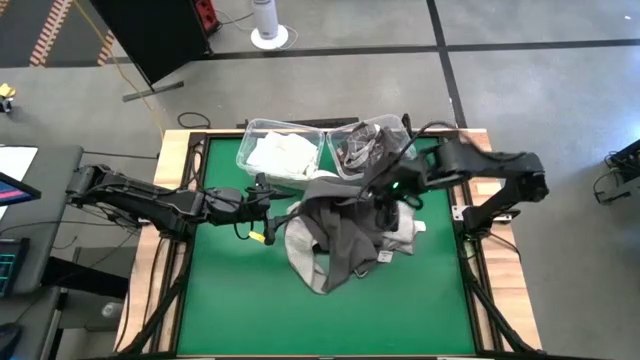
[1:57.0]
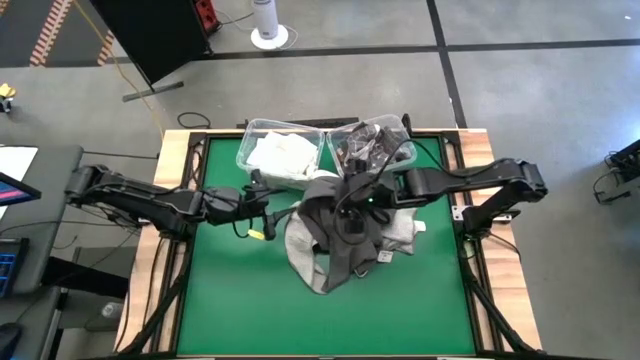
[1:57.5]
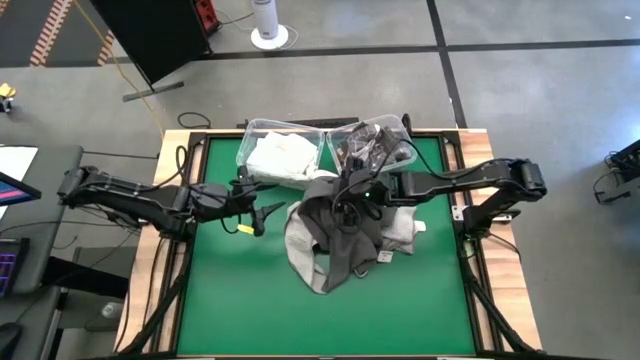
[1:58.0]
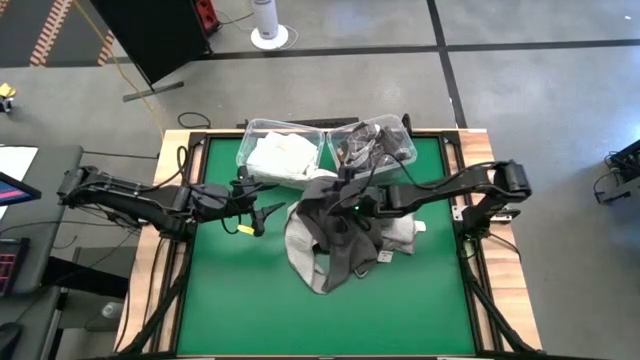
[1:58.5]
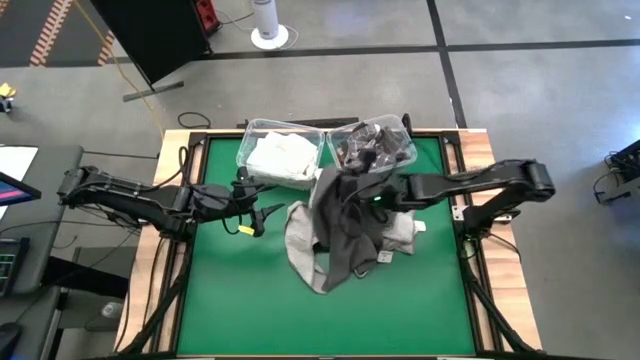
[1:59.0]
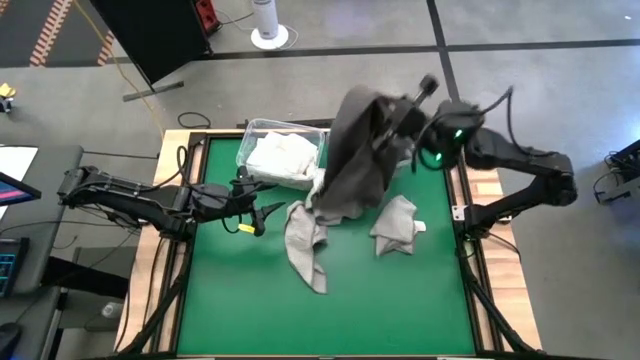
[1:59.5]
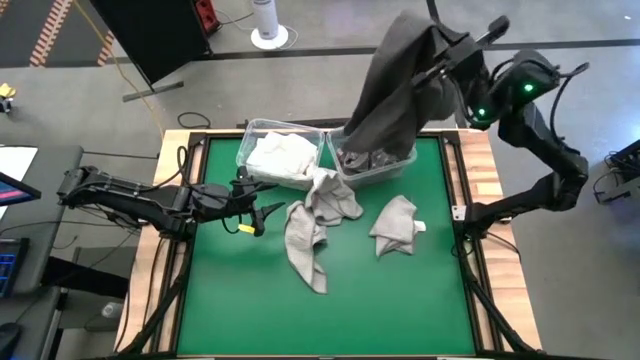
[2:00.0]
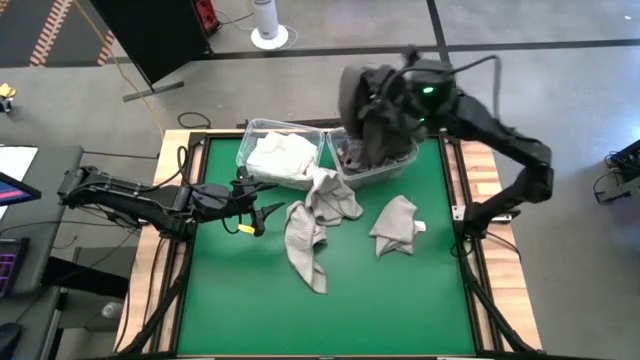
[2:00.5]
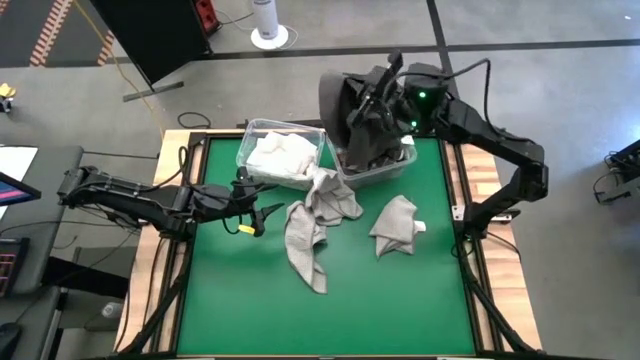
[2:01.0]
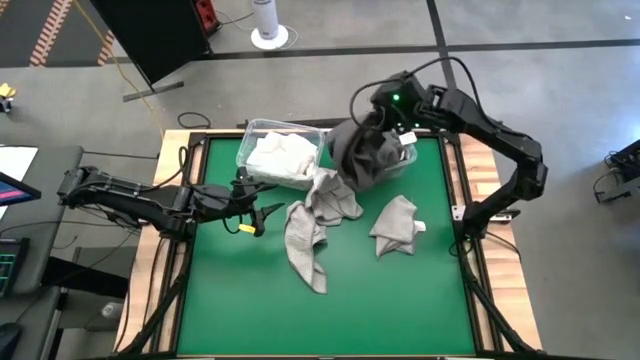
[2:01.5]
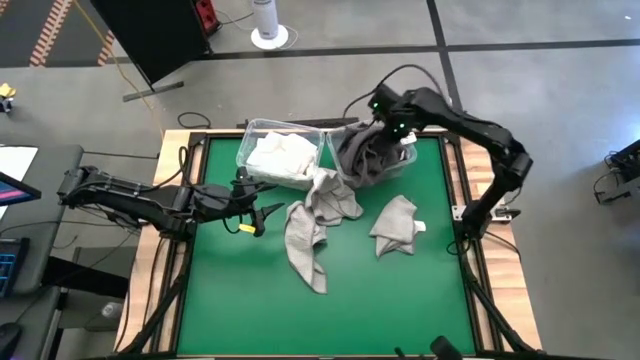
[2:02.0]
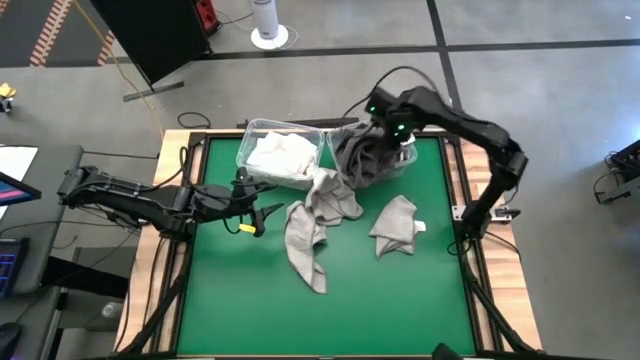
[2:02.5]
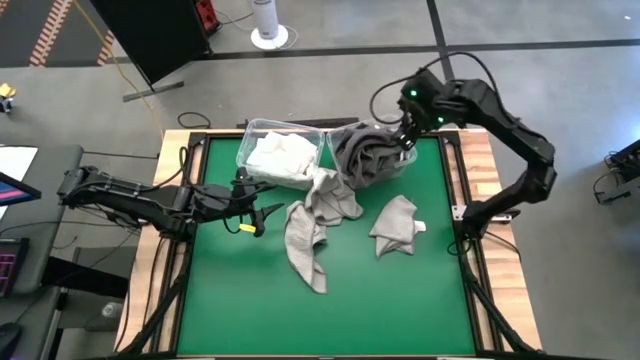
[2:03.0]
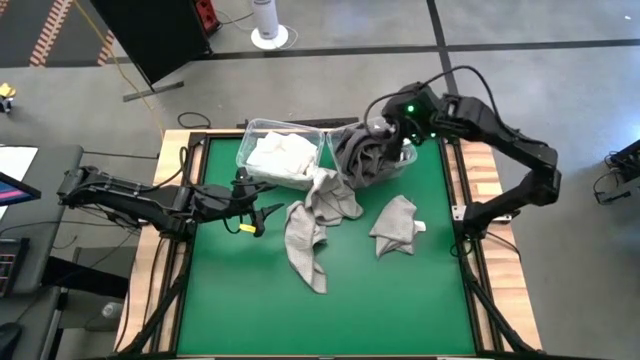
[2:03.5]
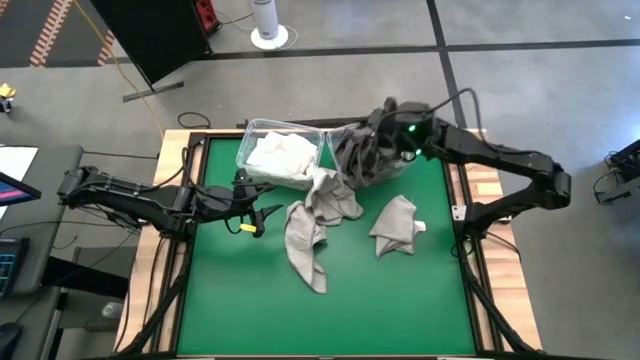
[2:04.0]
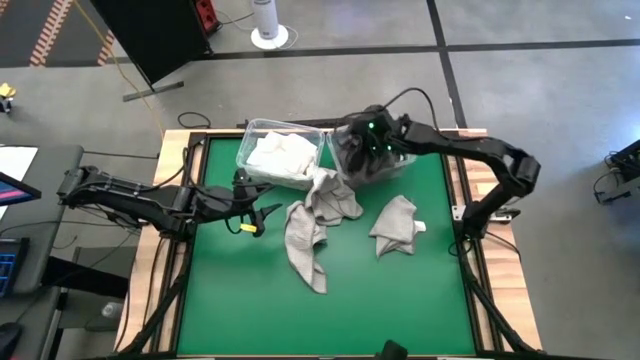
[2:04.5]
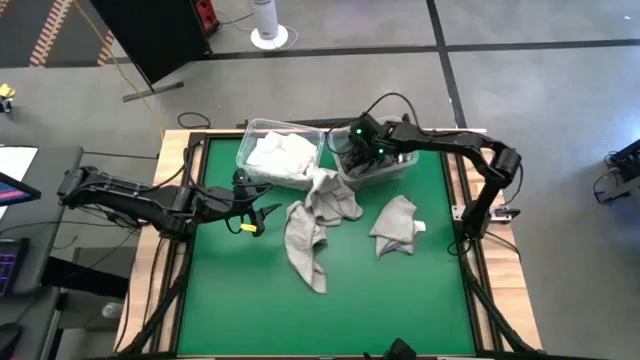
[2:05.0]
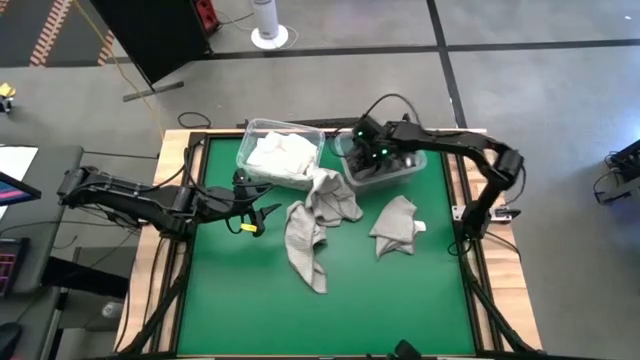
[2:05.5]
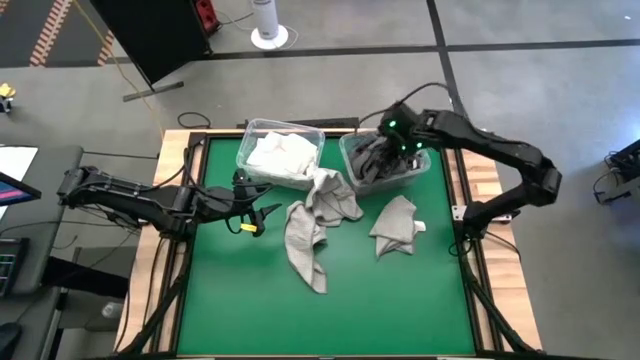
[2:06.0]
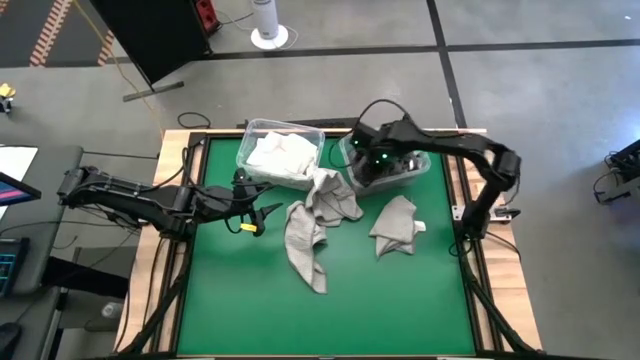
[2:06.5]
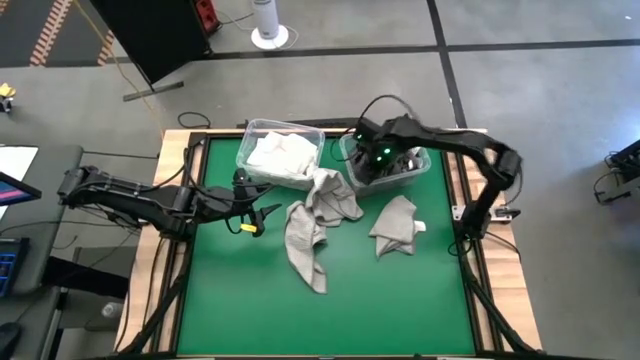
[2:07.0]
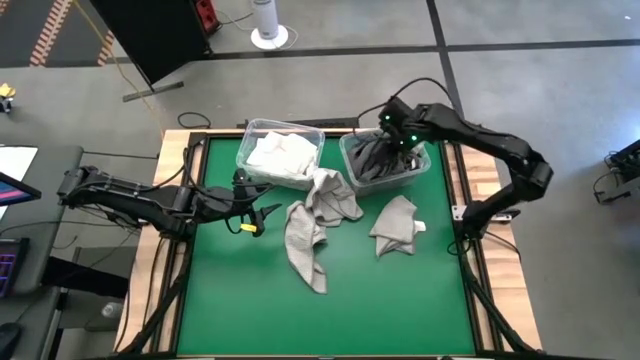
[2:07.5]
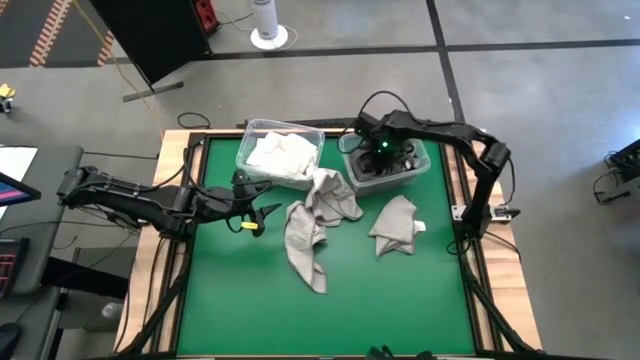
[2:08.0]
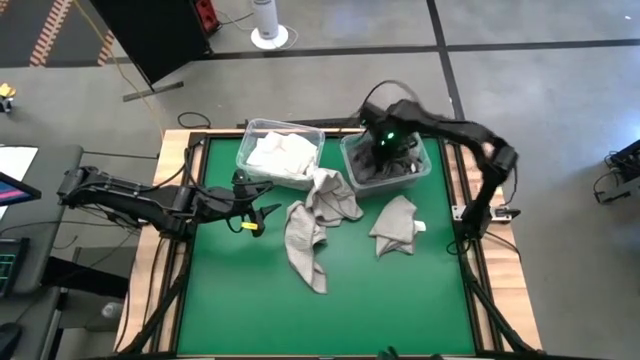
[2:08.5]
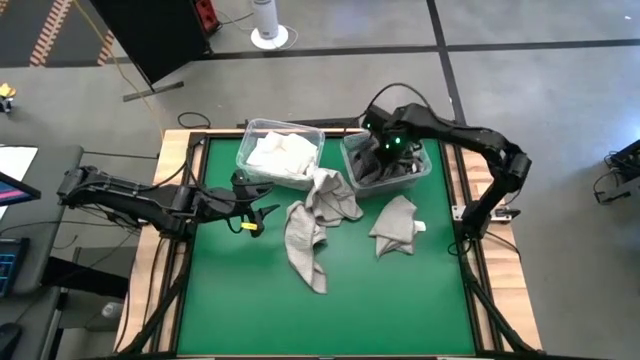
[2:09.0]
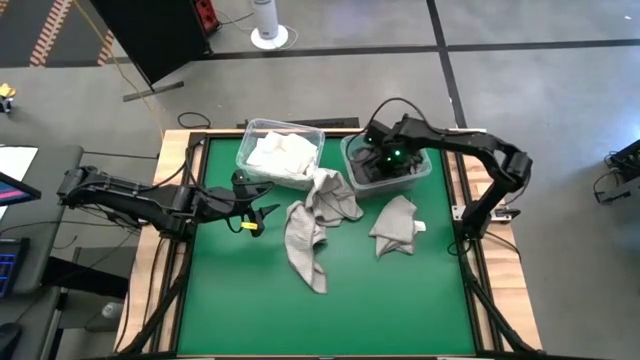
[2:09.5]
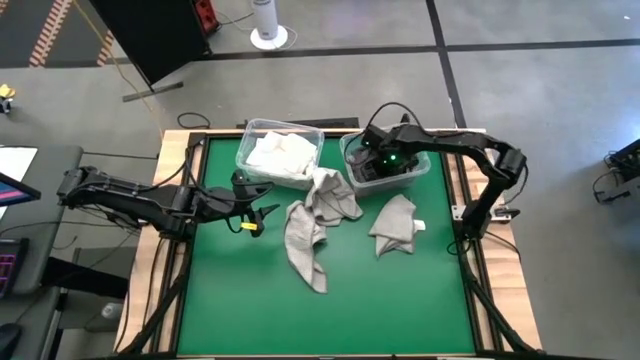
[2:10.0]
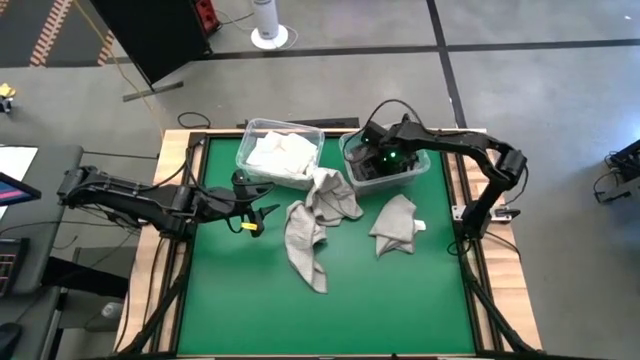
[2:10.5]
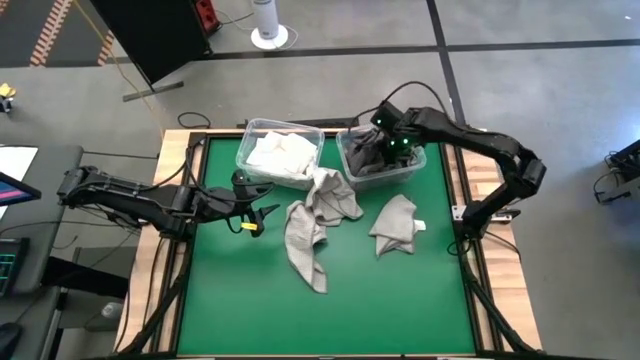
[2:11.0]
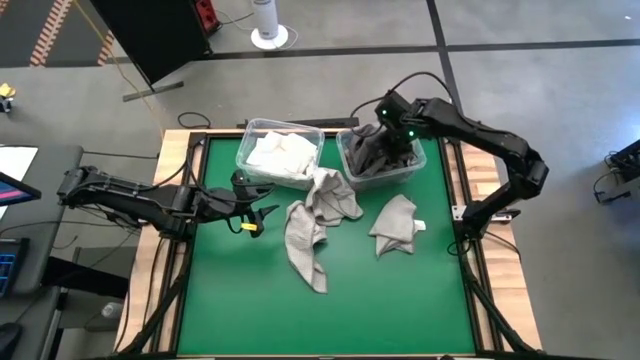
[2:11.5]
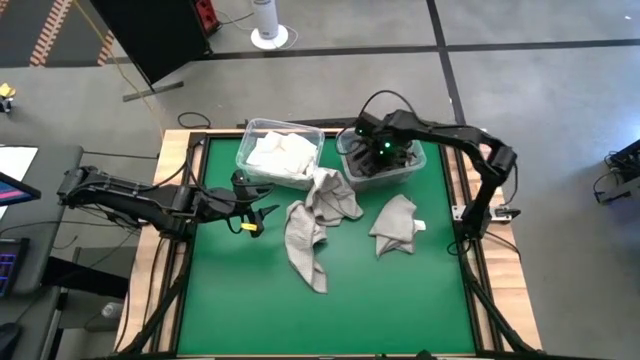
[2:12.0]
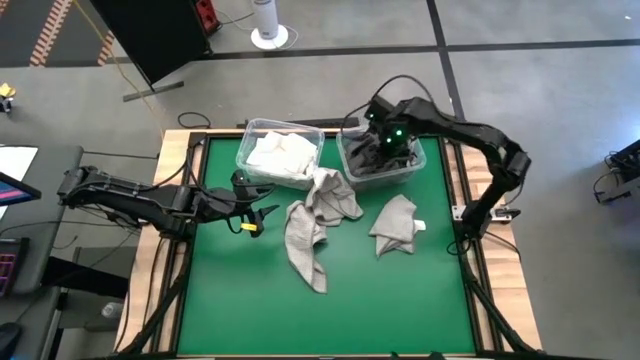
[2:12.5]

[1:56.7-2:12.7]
Task: Sort towels by color in basket
Put the black microfiber towel into the right transparent bin

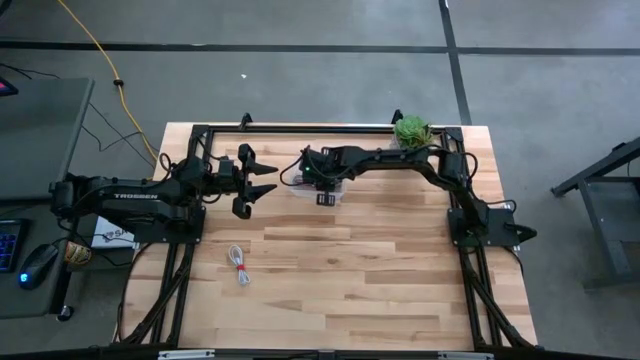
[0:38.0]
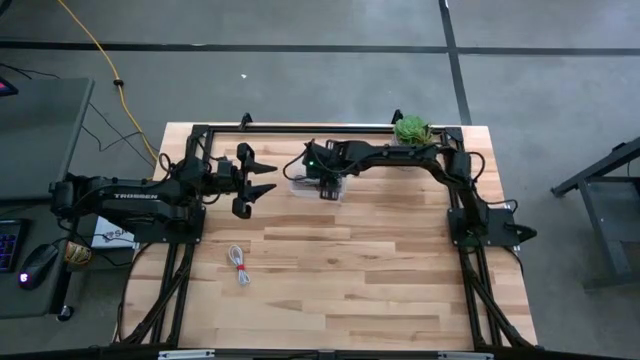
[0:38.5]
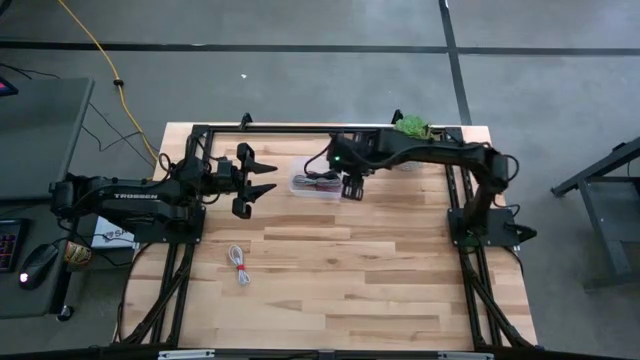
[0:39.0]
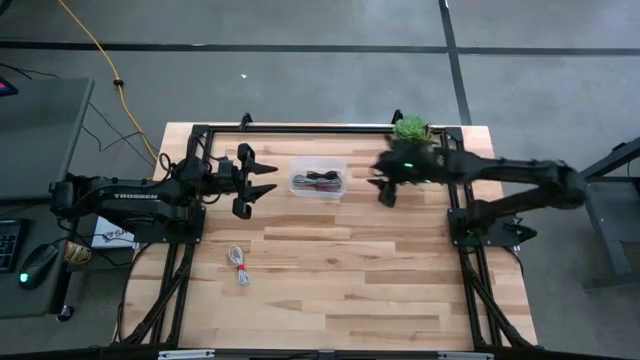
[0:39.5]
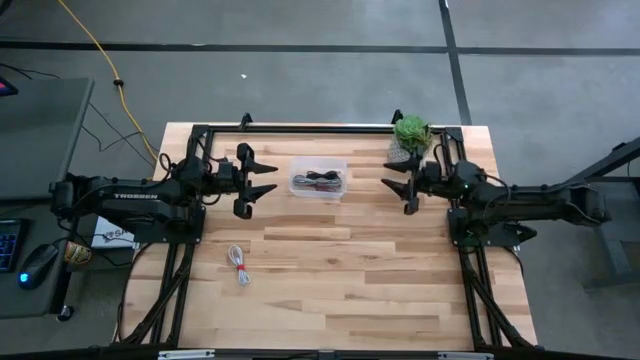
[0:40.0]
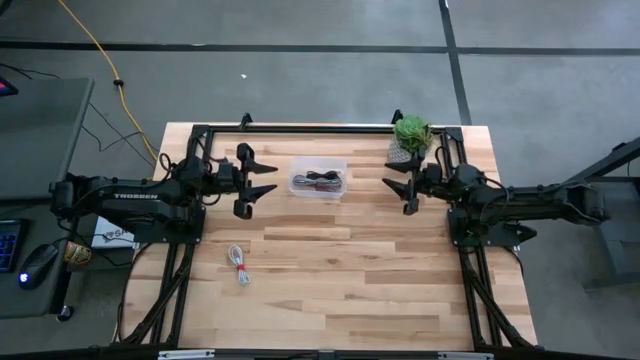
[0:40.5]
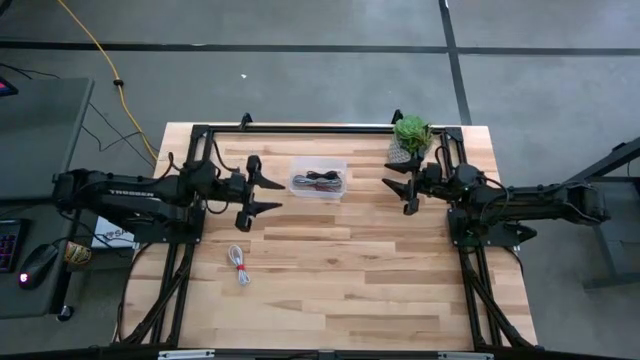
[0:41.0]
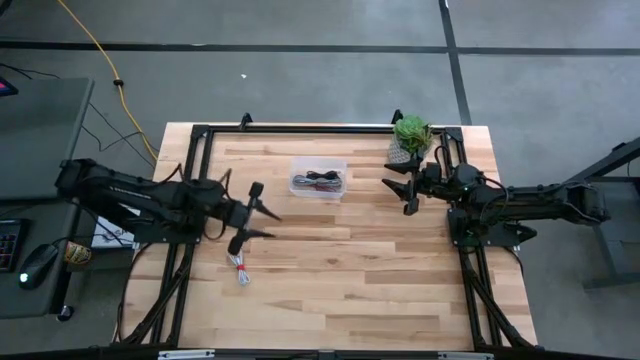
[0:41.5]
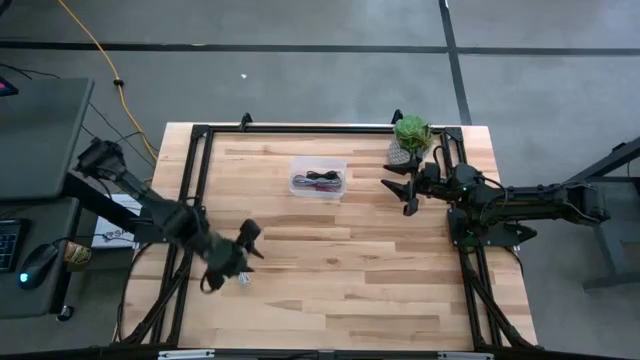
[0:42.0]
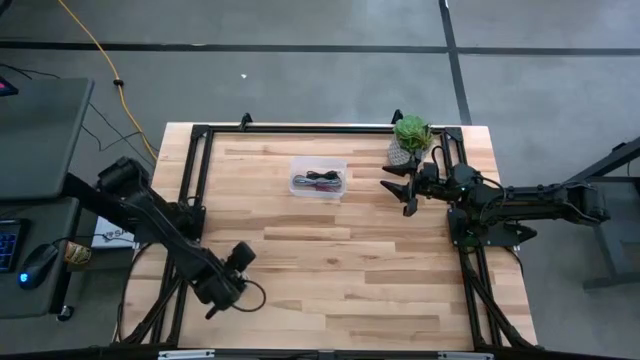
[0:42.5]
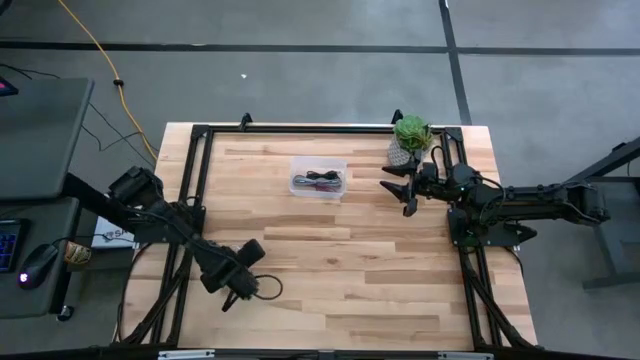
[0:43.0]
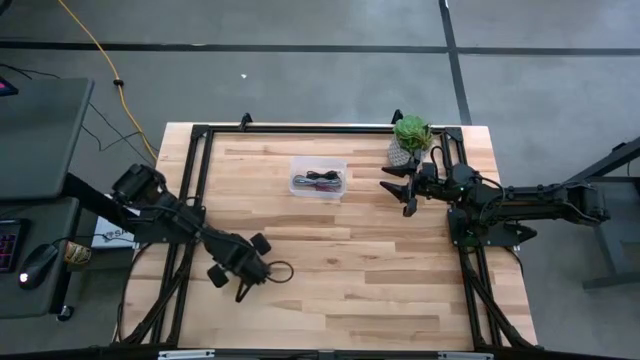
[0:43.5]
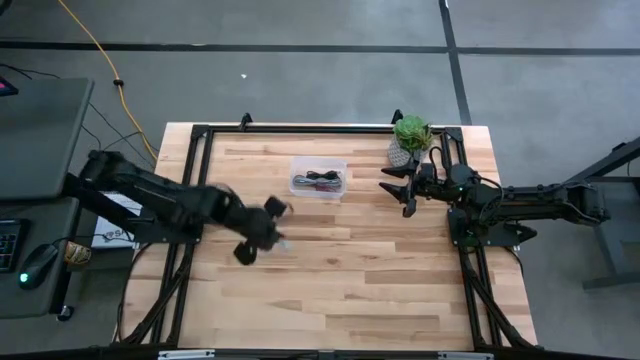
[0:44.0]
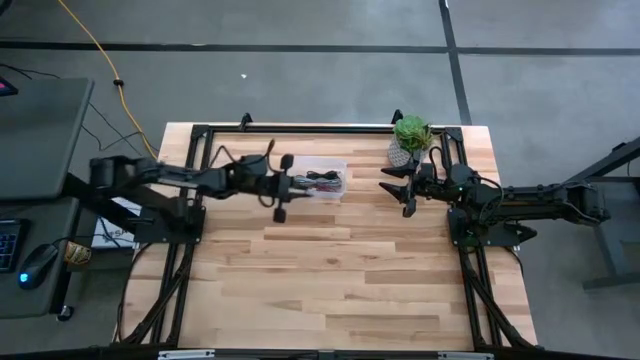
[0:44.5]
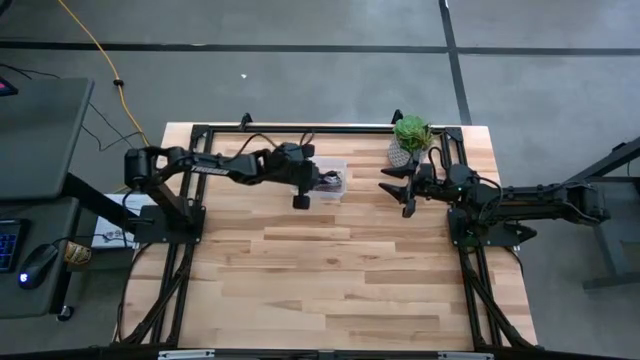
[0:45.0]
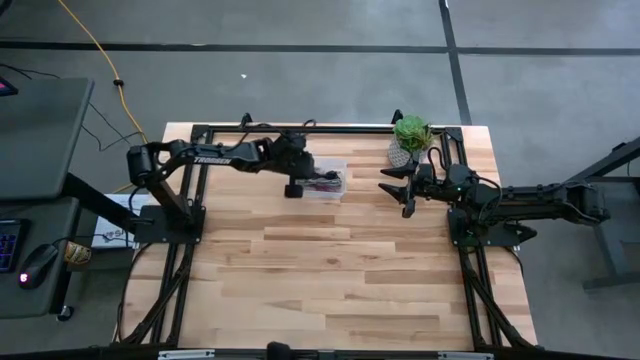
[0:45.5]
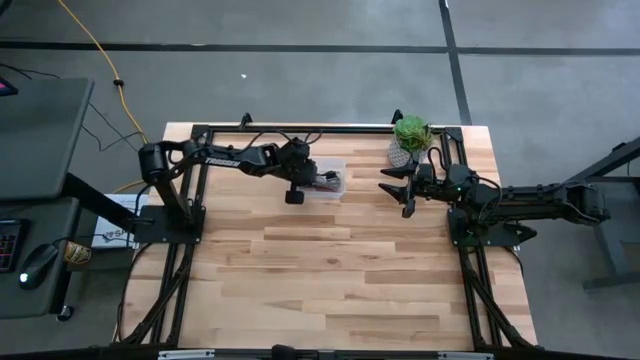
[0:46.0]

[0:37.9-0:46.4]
Task: Pick and place USB-C Cables
Put the white charger cable into the transparent bin
